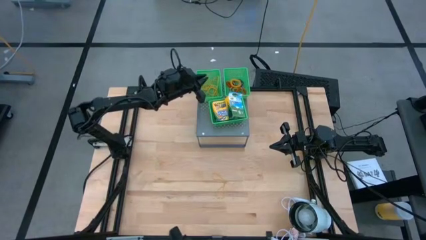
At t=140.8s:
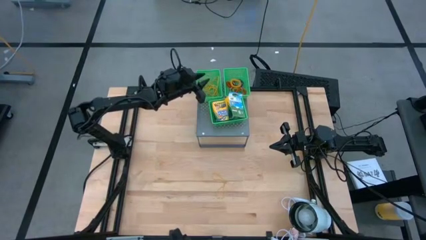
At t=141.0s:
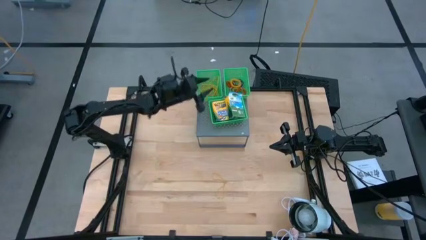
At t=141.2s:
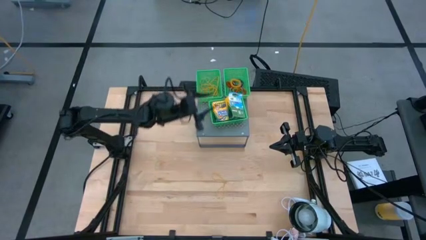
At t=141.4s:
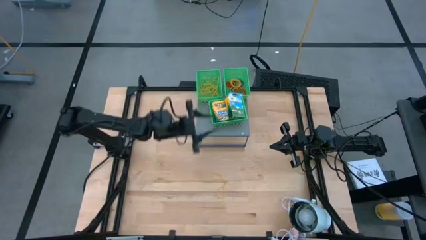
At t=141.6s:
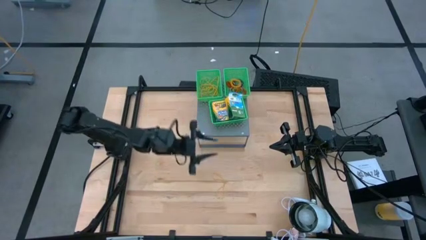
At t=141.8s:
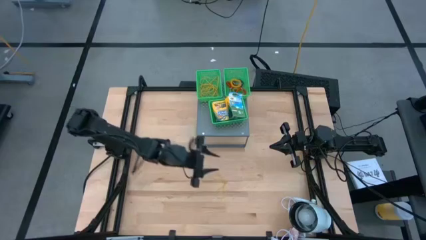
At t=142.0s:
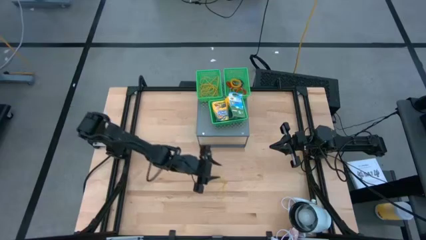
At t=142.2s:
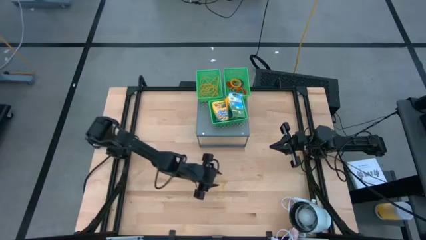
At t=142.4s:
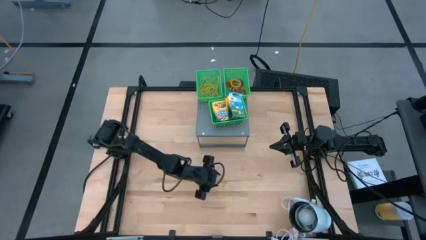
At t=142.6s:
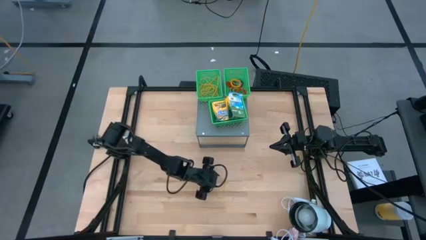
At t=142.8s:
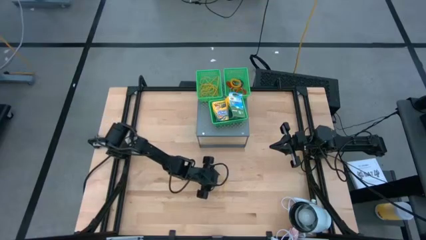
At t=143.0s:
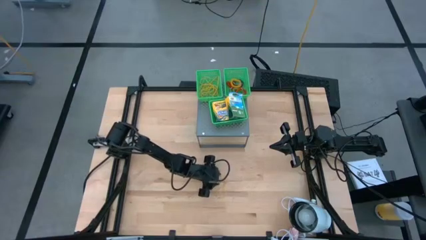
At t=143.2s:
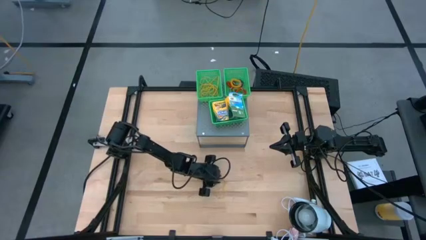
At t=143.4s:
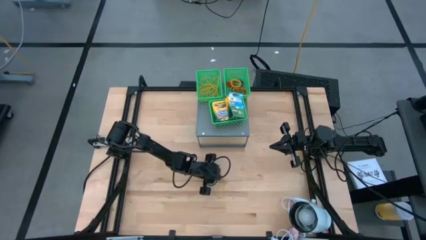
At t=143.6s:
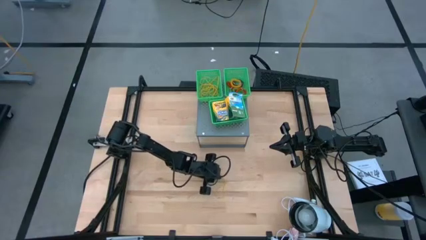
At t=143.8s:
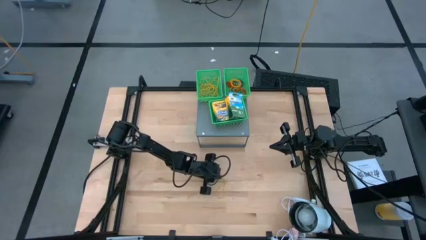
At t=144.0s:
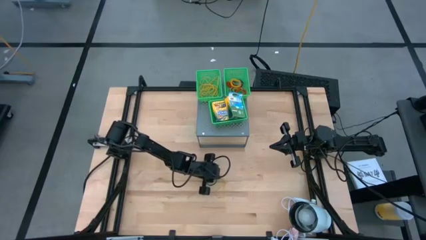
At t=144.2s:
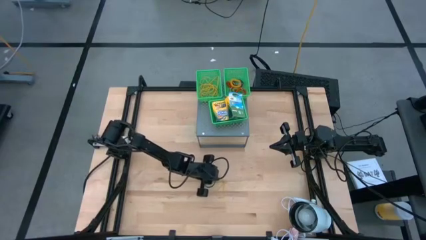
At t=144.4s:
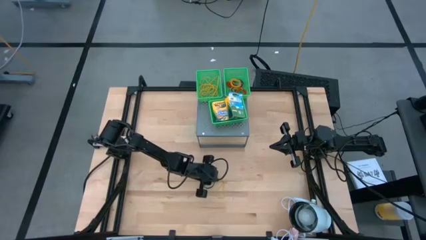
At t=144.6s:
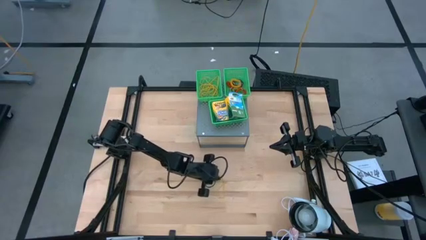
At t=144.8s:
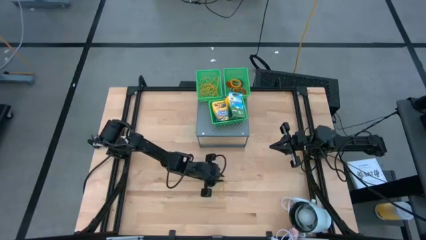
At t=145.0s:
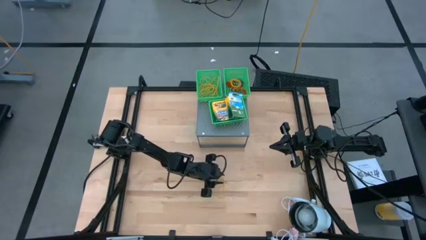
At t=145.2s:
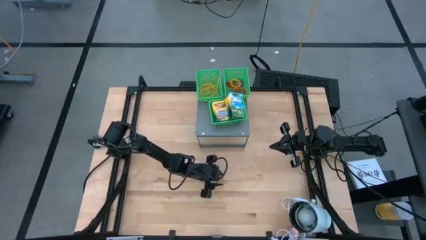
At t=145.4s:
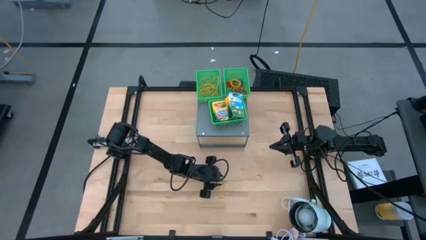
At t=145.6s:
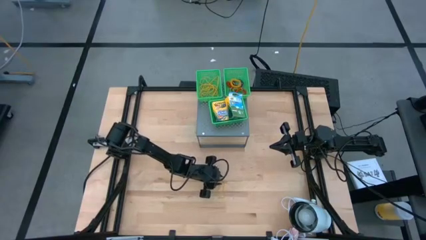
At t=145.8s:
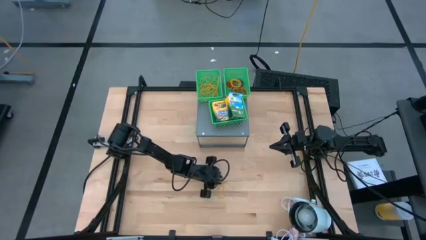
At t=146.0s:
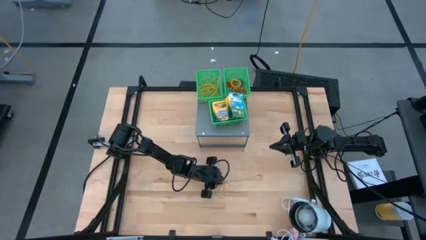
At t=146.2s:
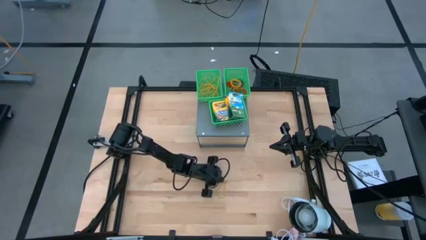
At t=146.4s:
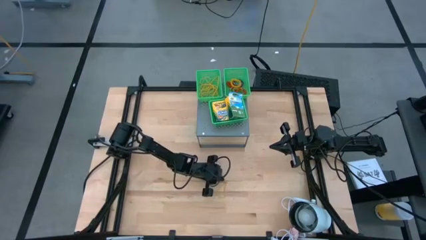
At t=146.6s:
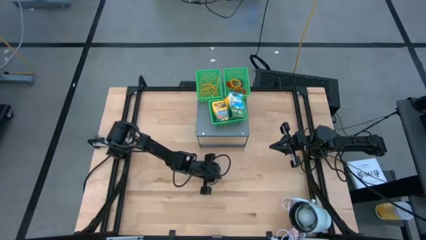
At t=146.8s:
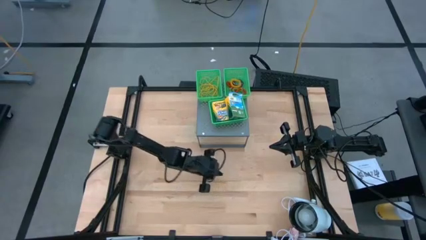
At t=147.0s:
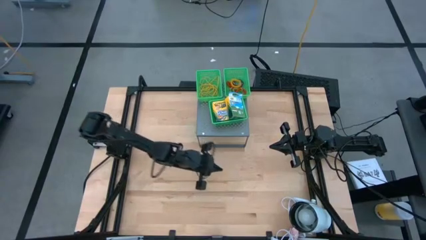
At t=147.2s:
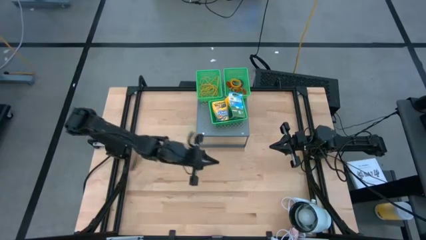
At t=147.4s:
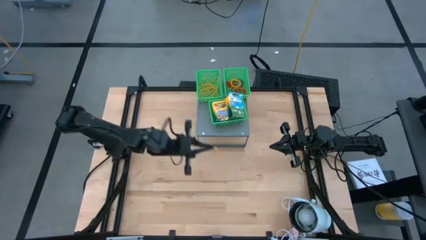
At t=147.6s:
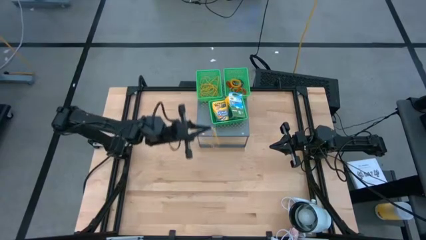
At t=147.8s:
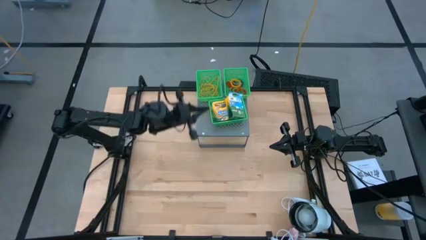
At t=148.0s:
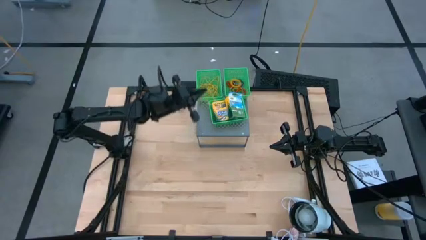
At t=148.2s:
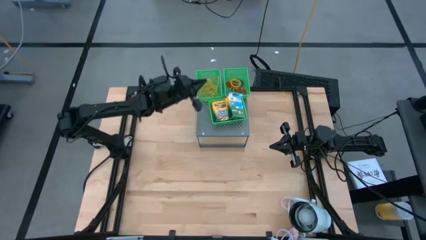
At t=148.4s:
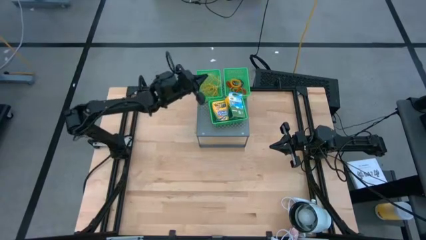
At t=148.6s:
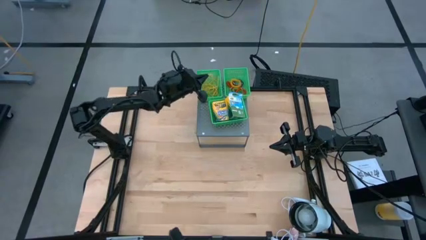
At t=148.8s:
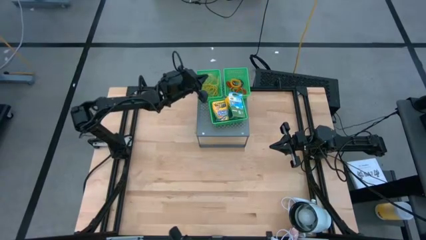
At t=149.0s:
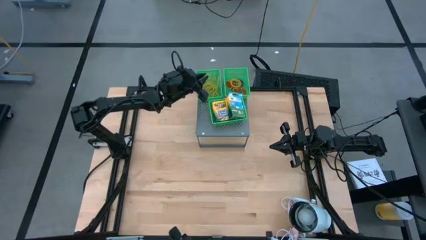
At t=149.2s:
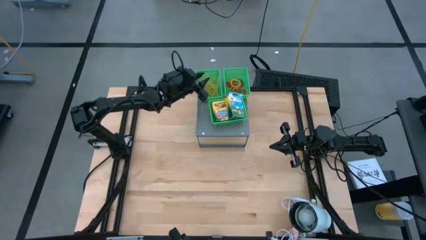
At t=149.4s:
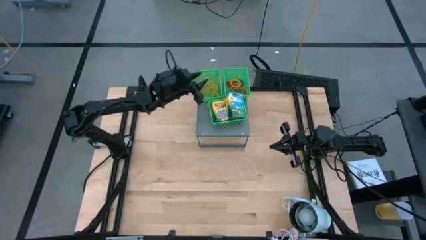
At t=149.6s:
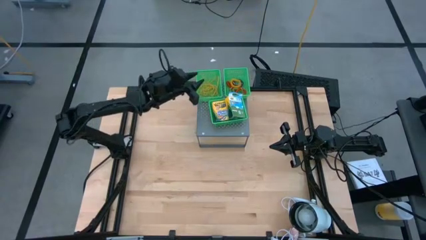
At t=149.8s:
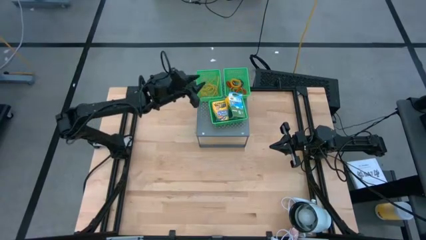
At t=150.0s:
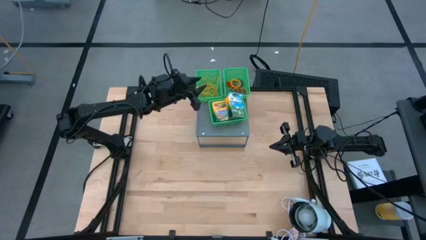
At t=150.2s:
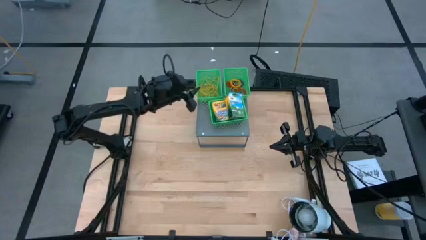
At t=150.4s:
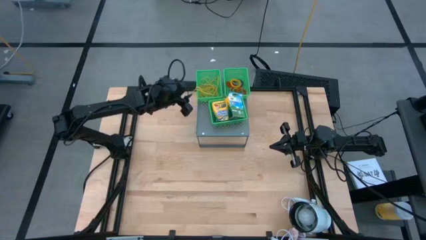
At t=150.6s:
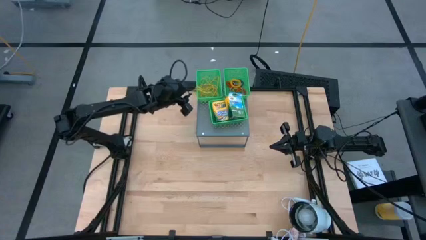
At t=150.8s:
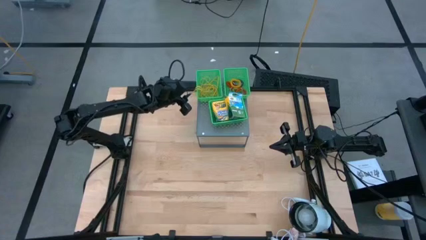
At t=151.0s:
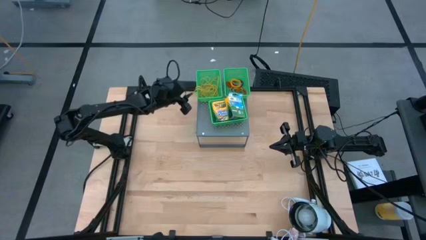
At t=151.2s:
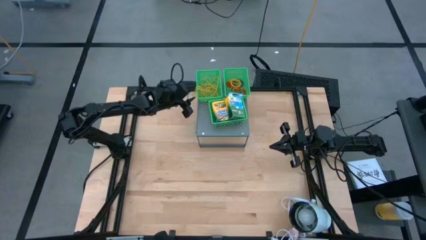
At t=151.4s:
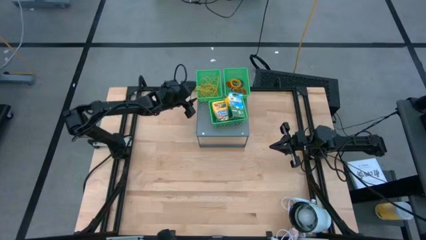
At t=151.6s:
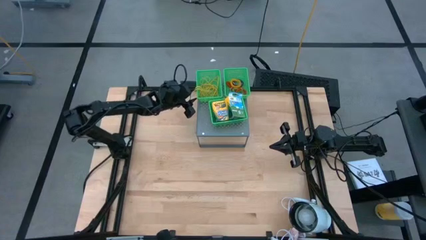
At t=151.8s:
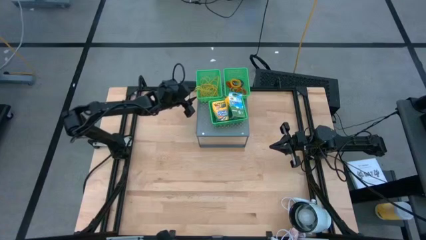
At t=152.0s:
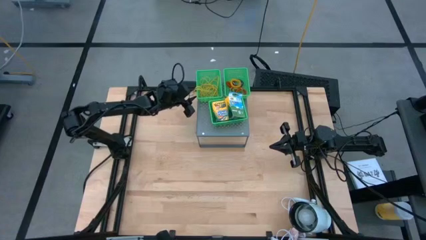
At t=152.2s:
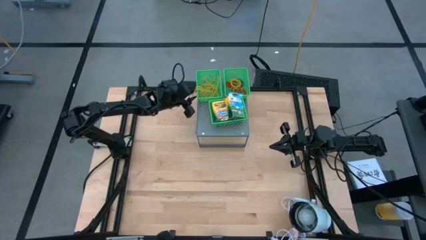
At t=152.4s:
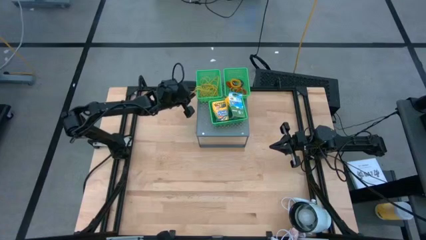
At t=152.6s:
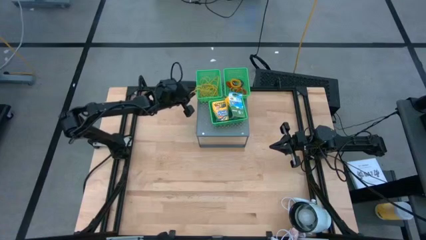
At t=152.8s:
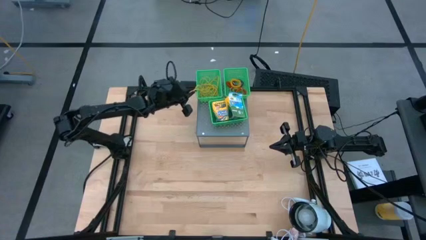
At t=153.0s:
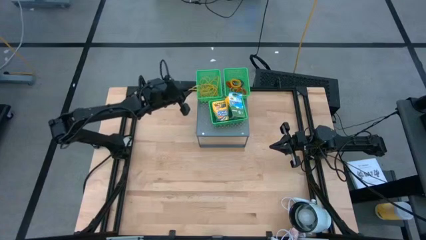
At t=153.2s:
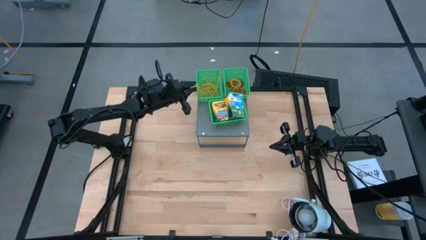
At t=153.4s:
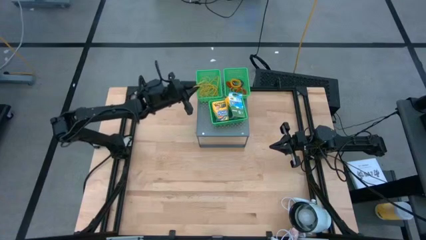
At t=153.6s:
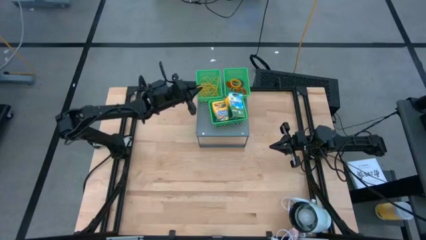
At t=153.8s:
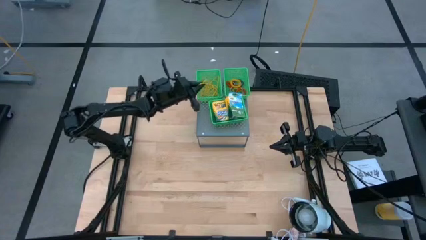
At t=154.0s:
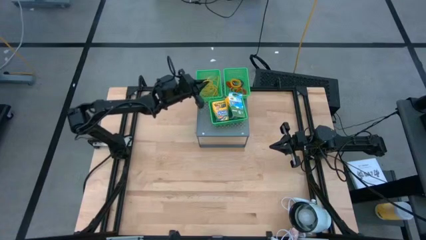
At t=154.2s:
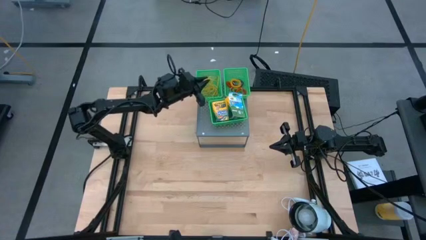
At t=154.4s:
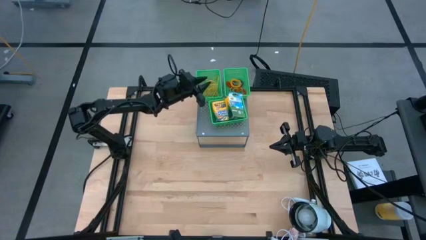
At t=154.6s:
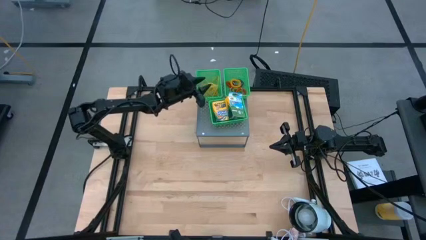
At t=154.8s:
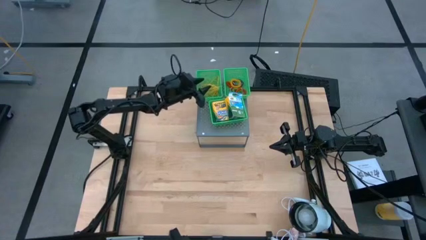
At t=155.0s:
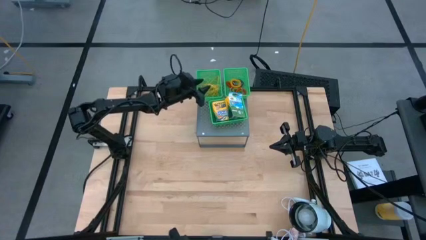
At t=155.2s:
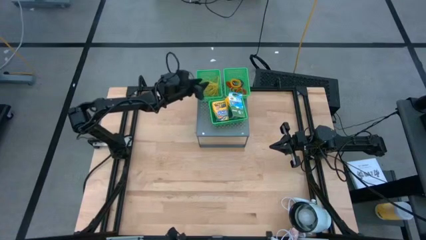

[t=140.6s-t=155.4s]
Task: Pick & Place Office Desk Supplies
Put the yellow rubber band into the left green bin on the shelf
